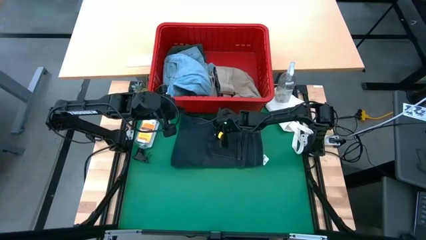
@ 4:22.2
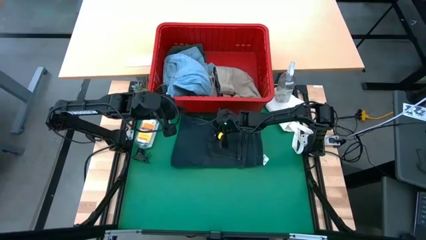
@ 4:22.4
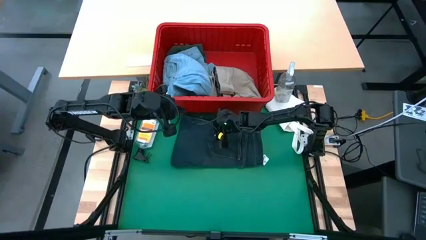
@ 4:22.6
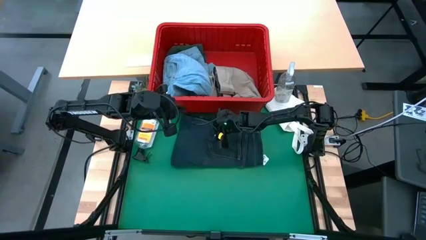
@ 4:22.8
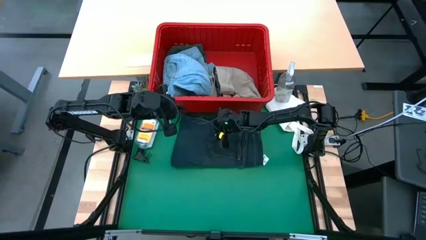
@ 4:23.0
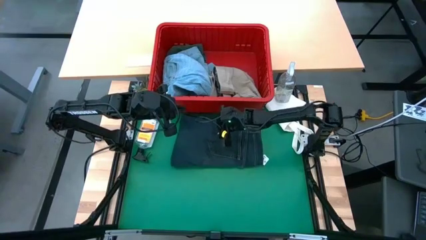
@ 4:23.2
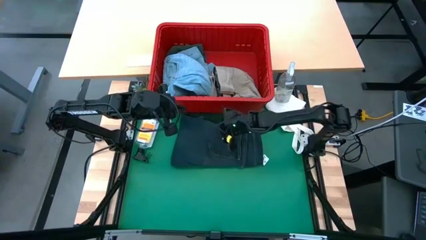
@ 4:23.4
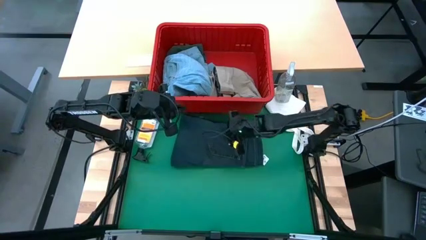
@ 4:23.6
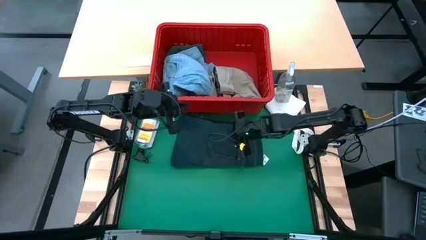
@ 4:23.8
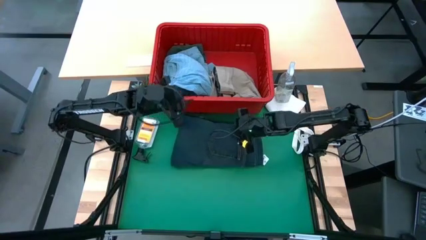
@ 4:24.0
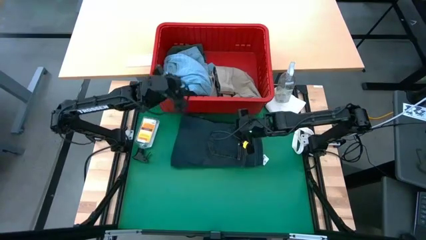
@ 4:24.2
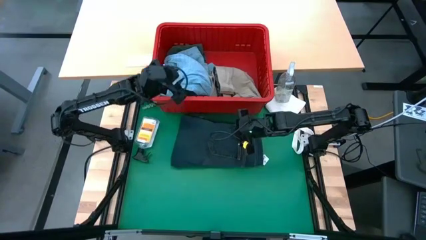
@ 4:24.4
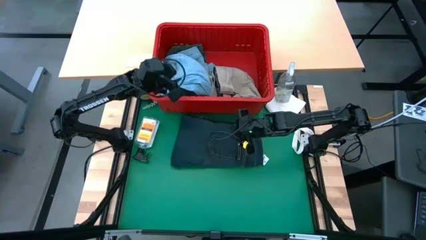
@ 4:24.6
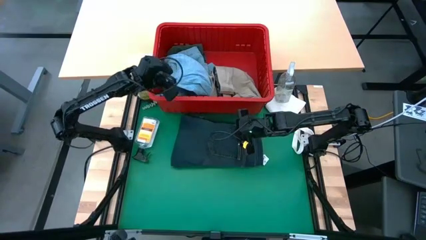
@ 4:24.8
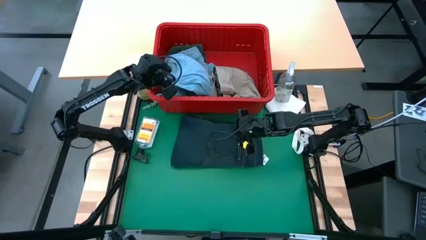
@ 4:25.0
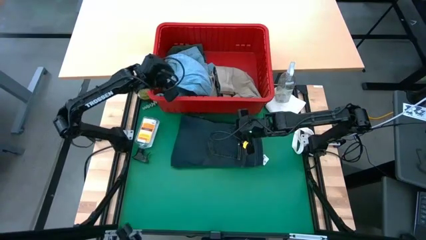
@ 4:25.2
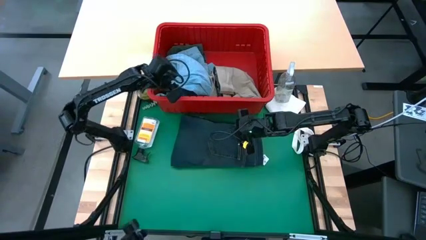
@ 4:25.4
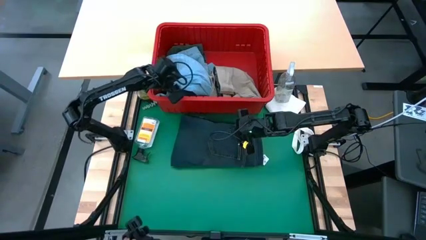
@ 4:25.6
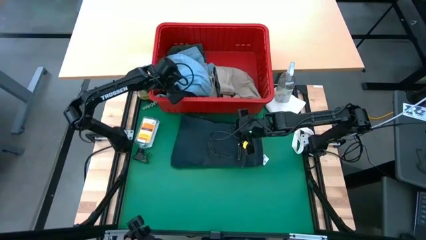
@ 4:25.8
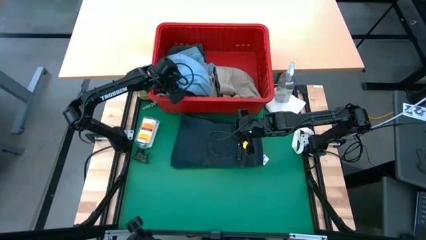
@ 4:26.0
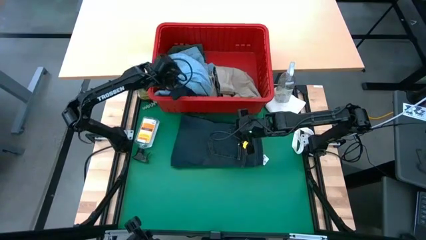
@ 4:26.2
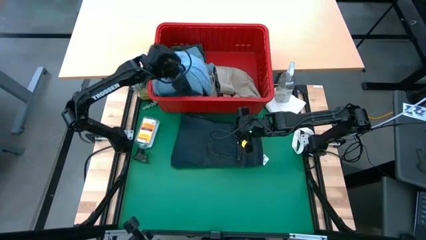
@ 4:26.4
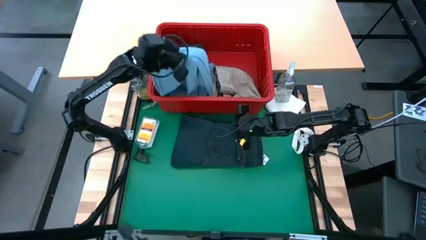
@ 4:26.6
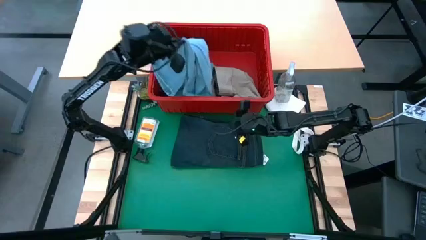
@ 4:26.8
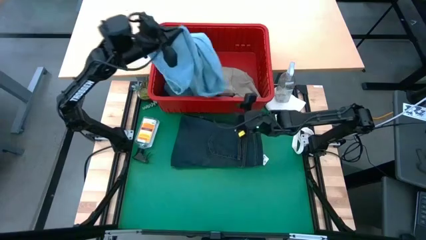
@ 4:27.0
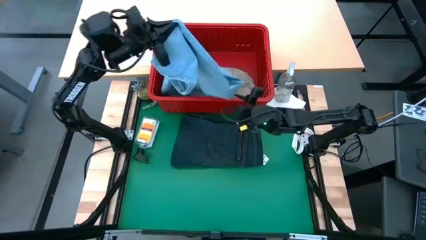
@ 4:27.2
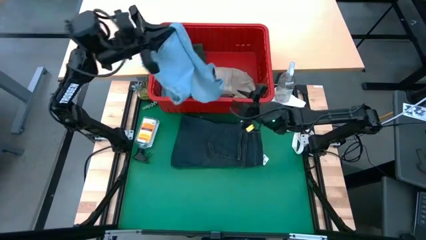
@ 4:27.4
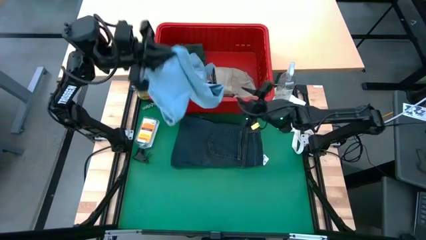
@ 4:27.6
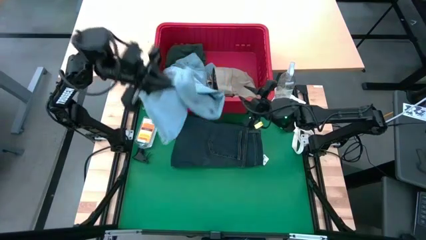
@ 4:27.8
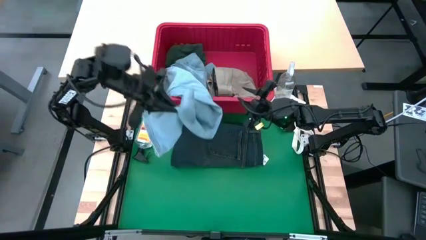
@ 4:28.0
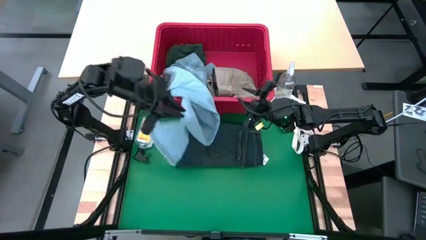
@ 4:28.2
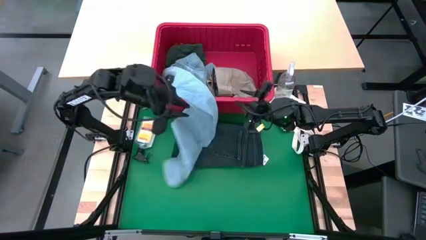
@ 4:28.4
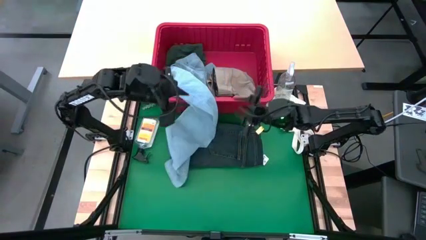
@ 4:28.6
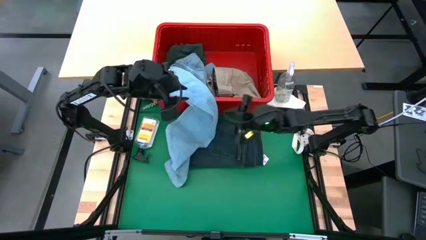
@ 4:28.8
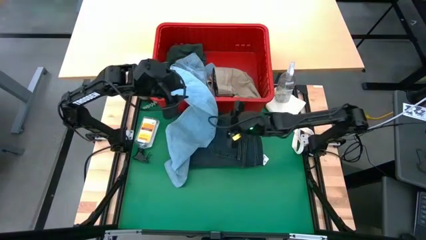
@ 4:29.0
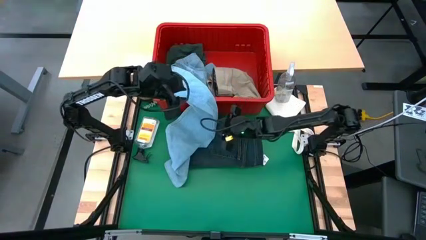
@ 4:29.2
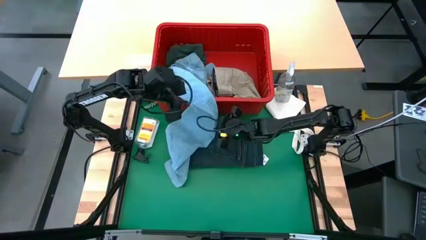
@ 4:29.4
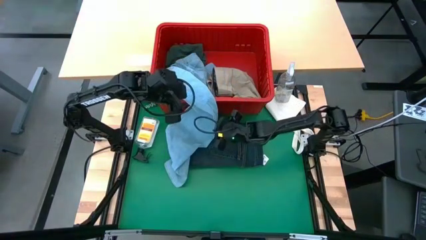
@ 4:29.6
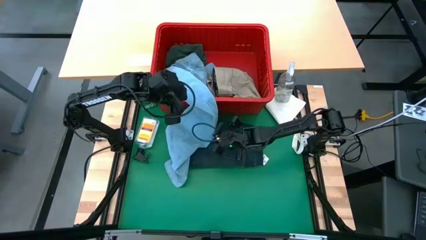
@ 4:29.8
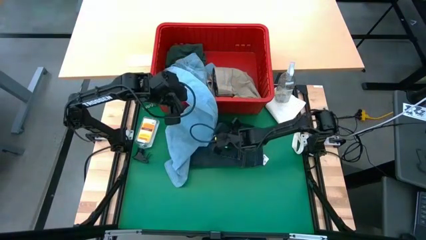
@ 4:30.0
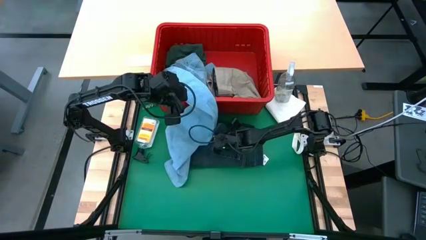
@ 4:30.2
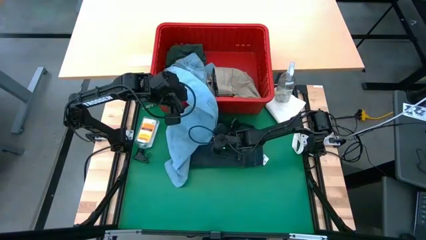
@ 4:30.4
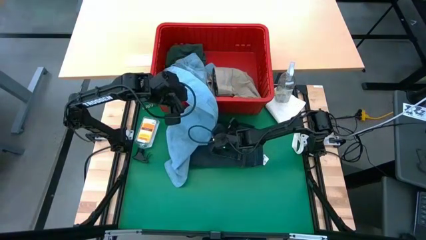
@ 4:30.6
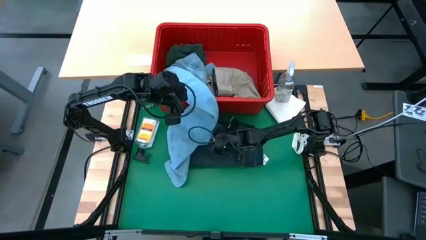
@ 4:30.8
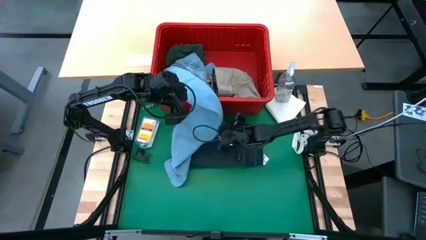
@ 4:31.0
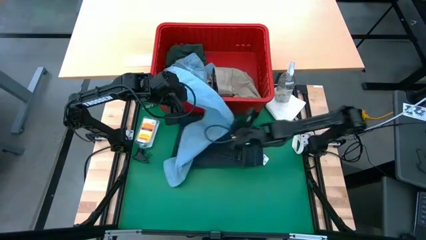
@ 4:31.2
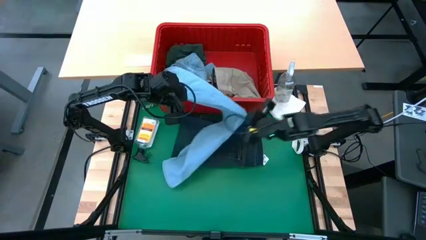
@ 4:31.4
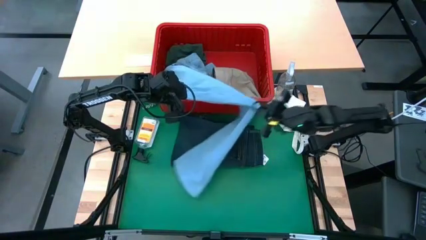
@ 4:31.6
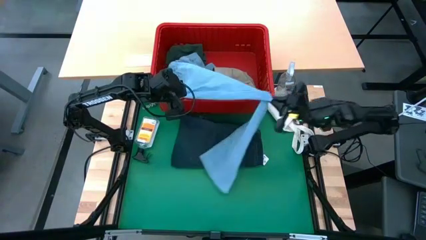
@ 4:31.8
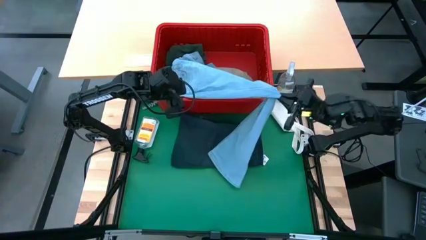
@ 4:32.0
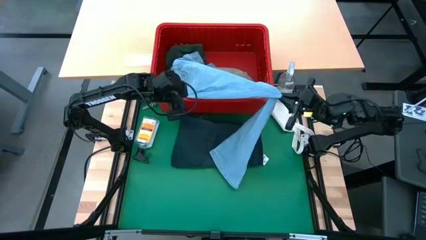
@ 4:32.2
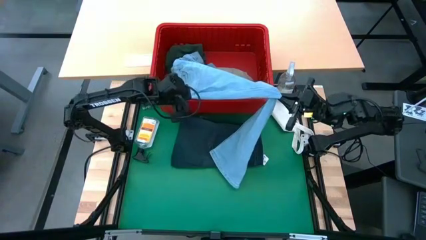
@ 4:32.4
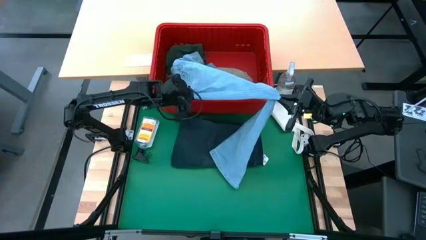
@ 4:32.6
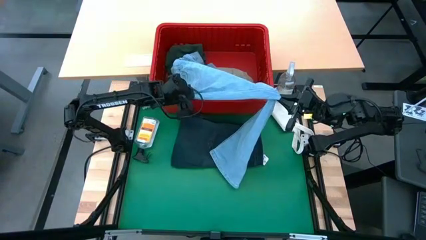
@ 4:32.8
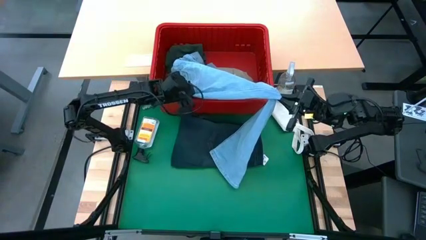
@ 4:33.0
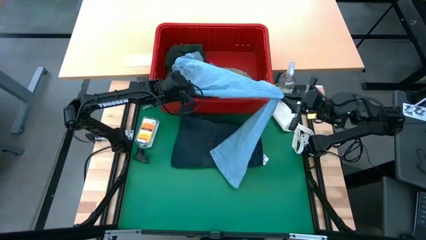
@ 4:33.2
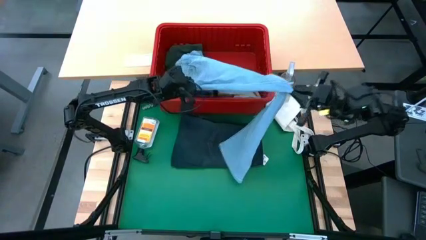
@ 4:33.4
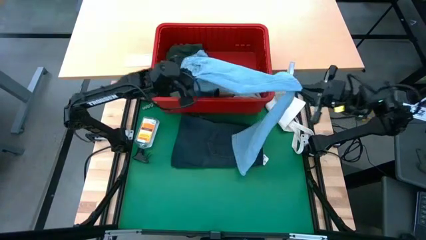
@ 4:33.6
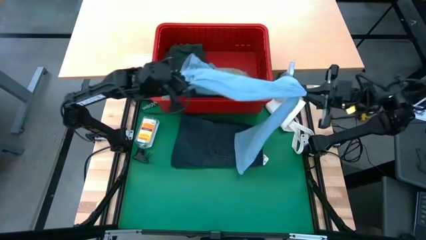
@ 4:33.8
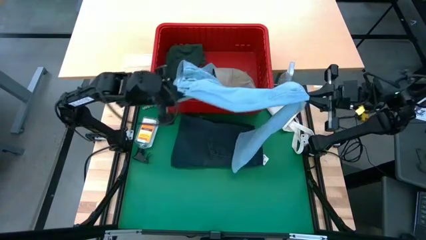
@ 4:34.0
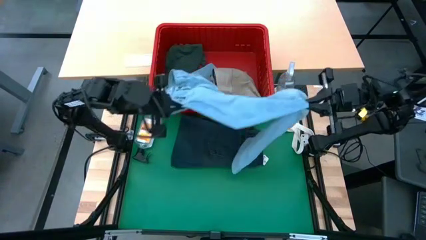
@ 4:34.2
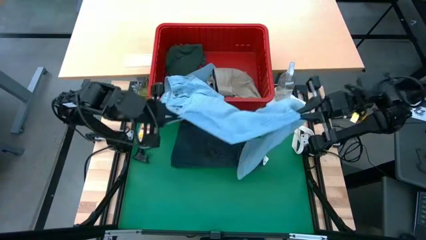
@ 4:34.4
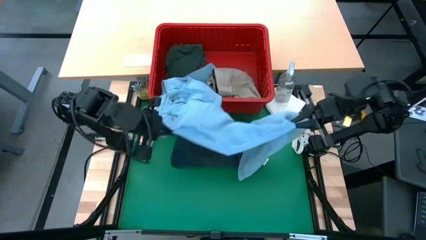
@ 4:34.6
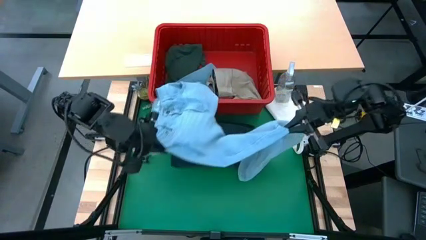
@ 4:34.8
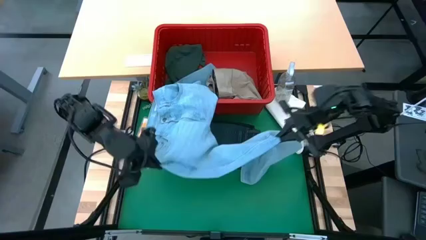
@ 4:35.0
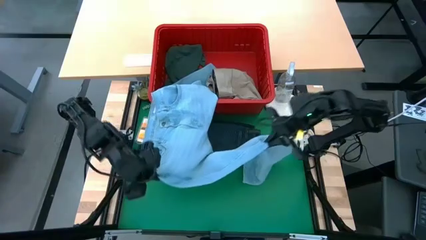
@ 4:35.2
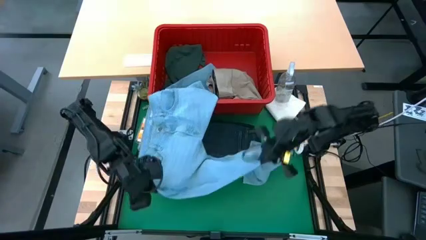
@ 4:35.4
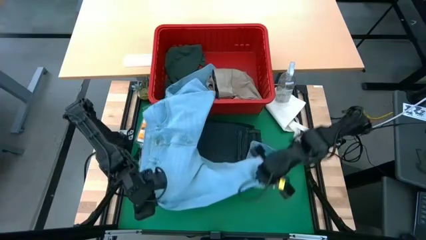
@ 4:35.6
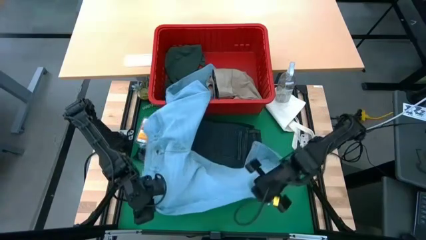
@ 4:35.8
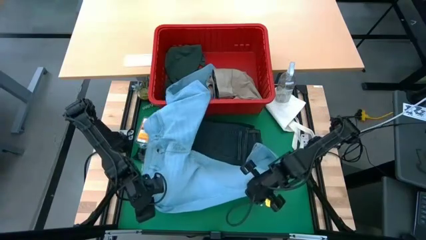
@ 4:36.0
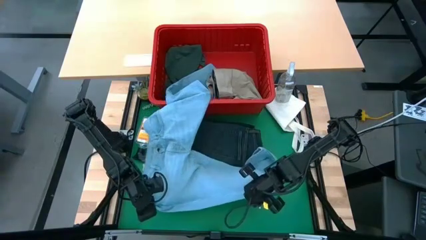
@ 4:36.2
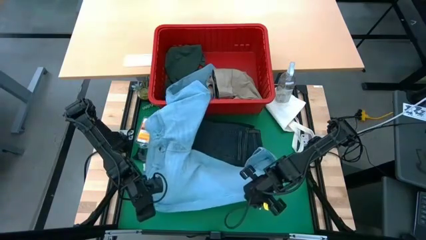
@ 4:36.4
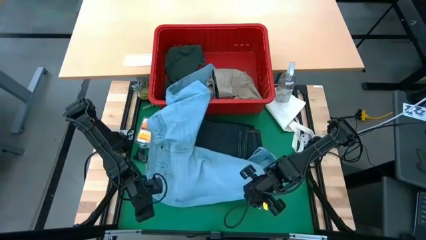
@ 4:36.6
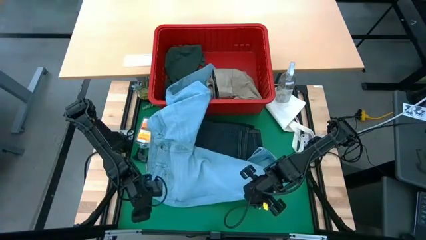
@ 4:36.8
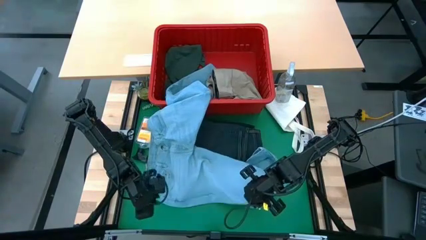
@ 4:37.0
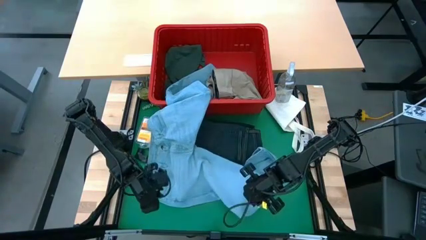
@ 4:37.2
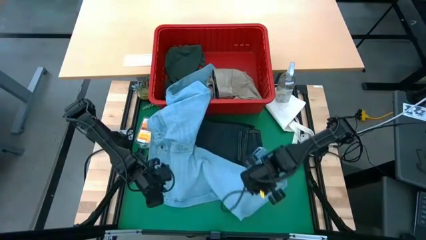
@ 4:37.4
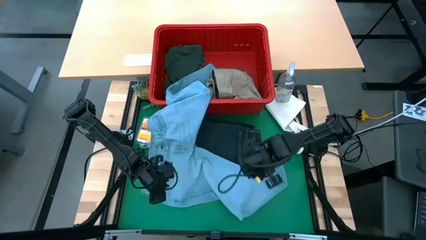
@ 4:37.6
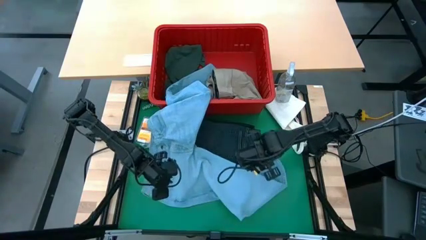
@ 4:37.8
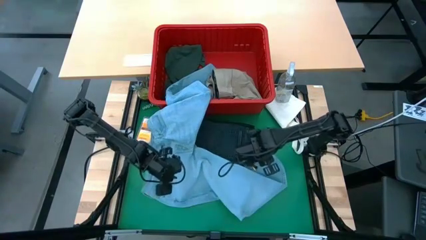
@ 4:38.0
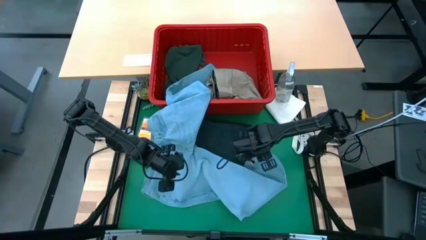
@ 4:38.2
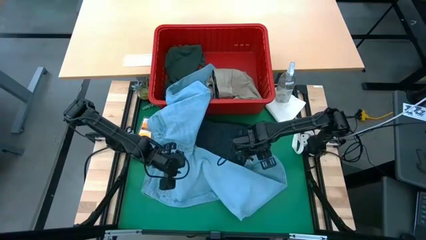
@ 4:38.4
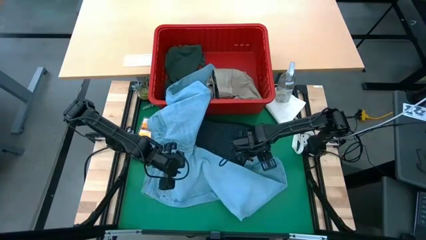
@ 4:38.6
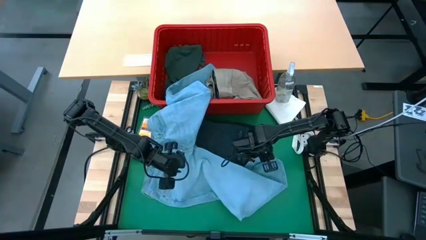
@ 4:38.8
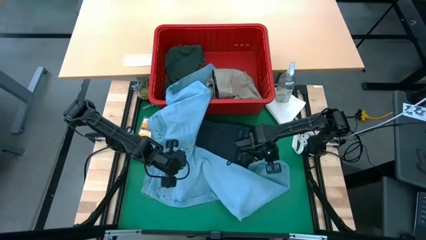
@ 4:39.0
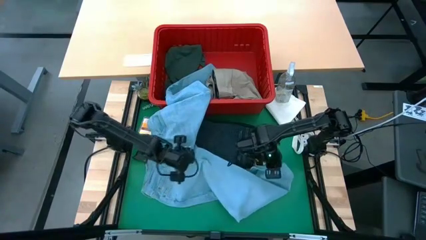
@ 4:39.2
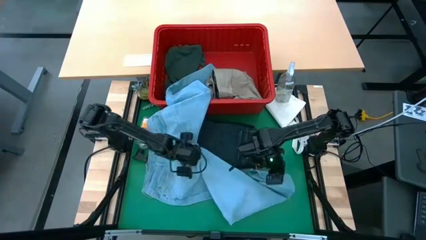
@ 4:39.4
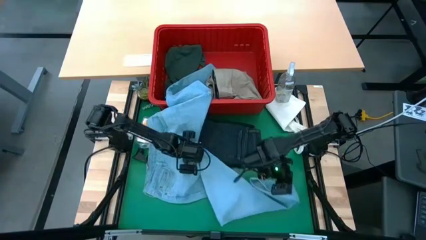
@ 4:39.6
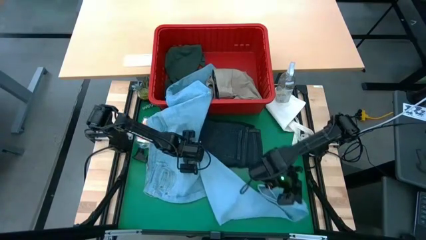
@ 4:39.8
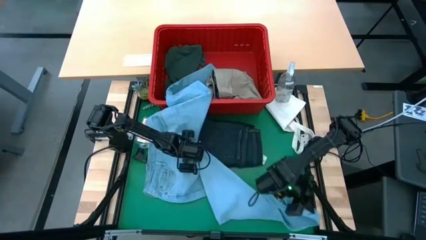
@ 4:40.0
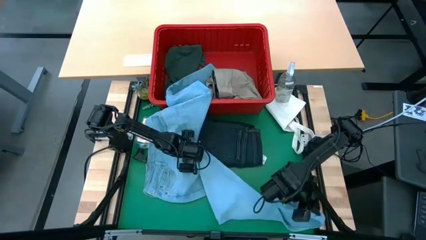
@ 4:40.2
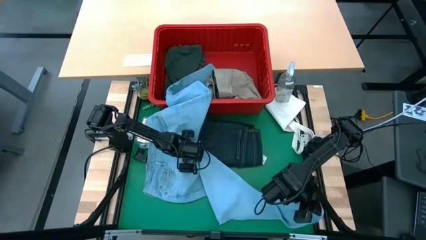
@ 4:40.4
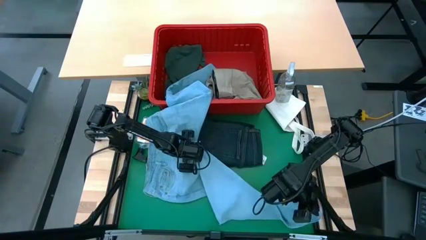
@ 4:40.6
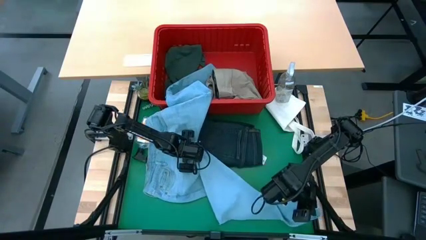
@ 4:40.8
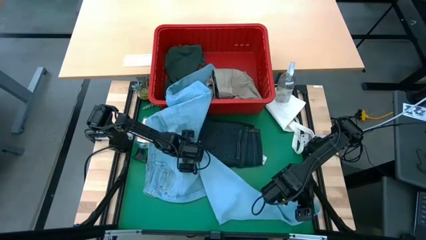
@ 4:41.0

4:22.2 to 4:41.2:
Task: Fold laundry
Fold the light blue jeans
